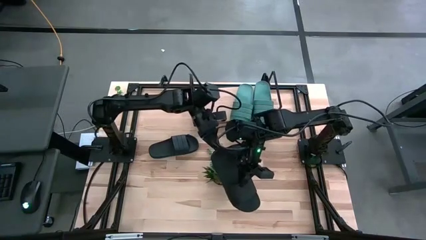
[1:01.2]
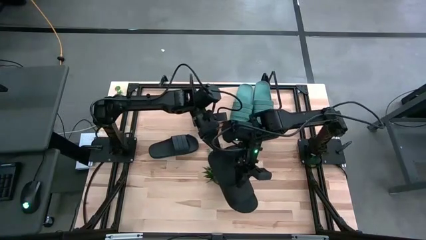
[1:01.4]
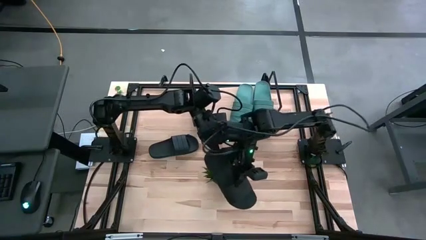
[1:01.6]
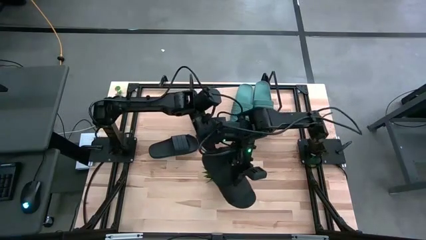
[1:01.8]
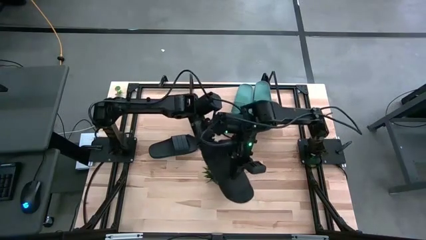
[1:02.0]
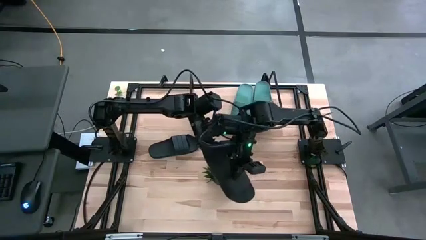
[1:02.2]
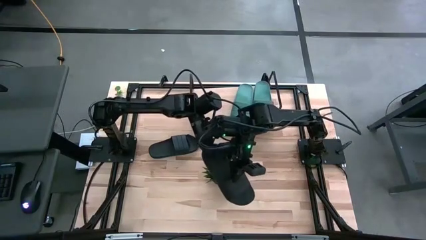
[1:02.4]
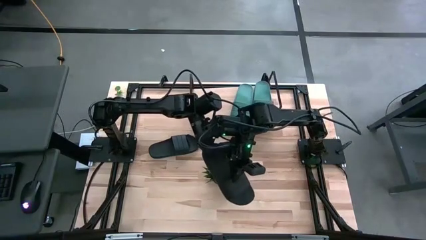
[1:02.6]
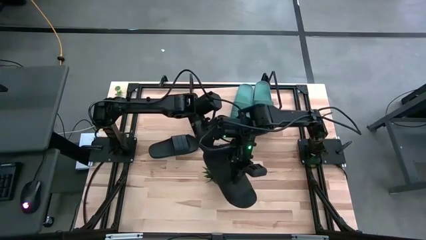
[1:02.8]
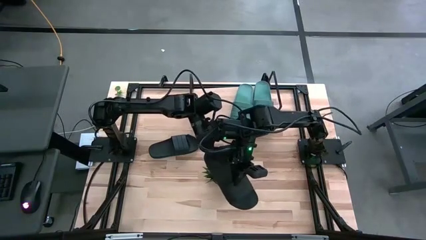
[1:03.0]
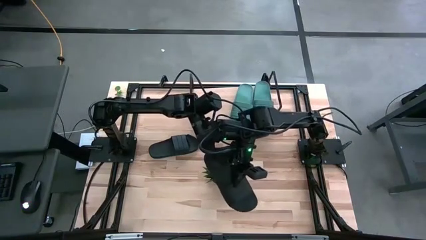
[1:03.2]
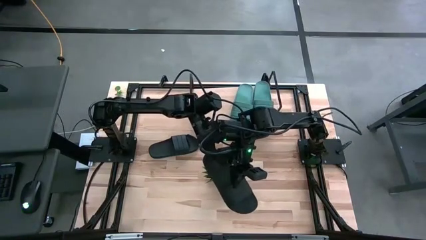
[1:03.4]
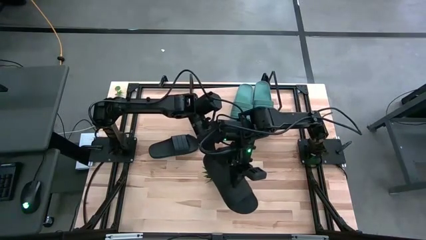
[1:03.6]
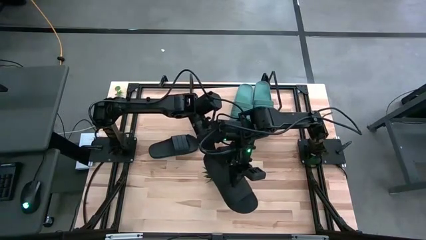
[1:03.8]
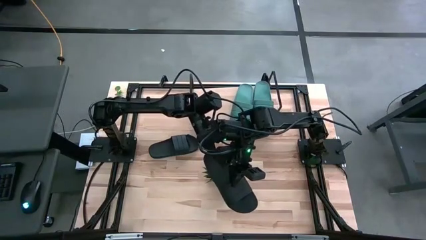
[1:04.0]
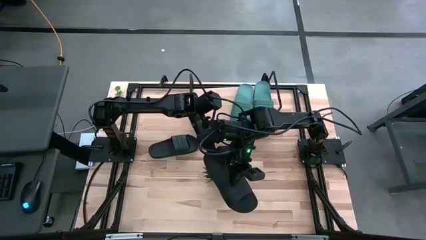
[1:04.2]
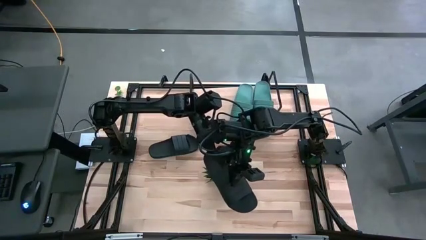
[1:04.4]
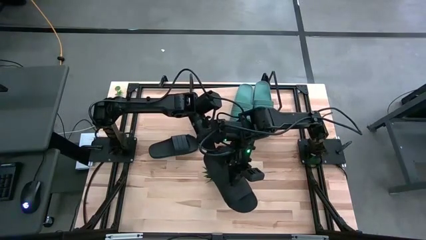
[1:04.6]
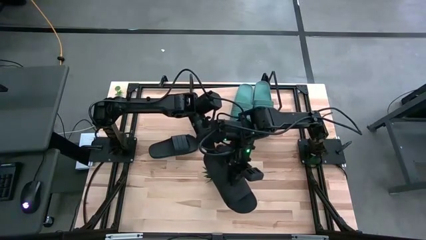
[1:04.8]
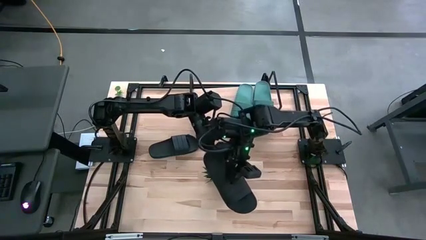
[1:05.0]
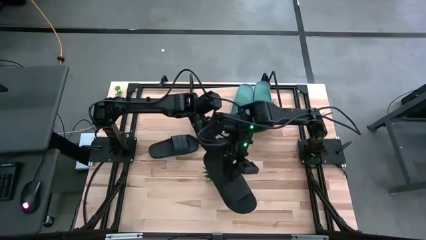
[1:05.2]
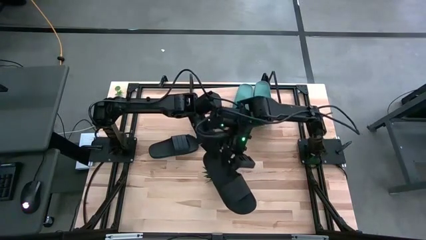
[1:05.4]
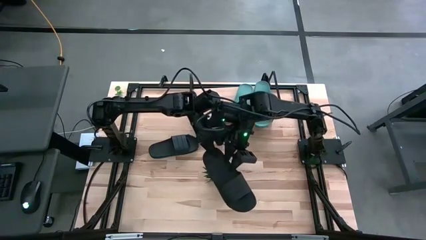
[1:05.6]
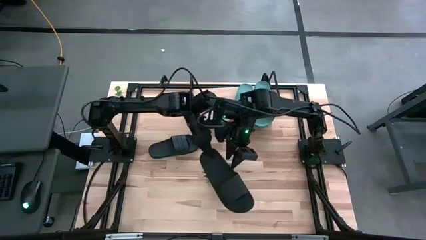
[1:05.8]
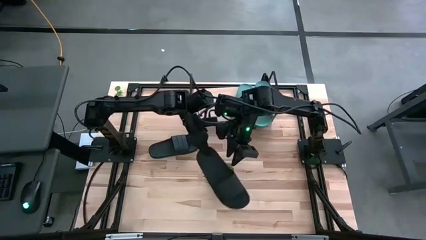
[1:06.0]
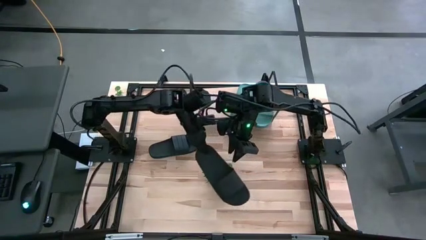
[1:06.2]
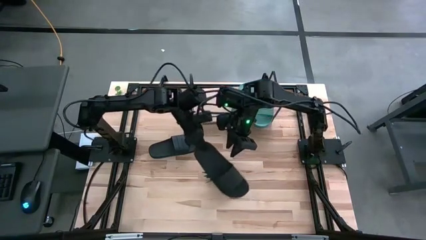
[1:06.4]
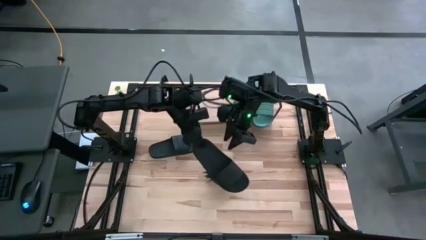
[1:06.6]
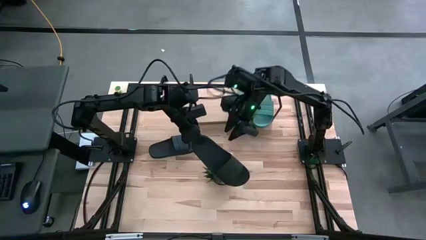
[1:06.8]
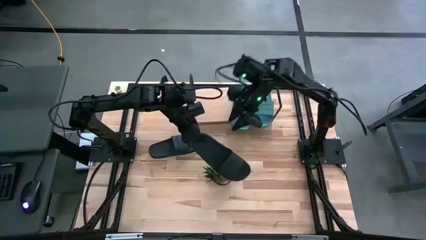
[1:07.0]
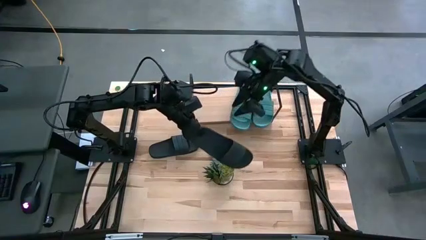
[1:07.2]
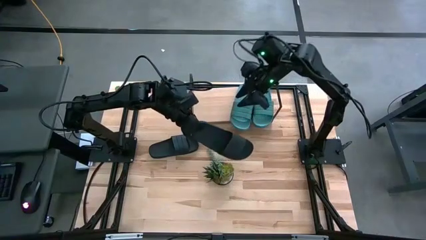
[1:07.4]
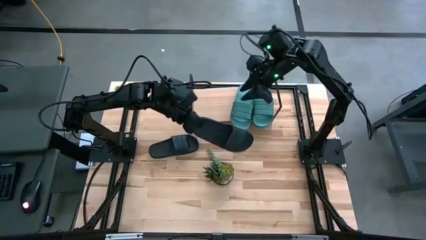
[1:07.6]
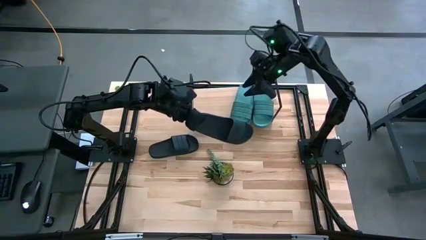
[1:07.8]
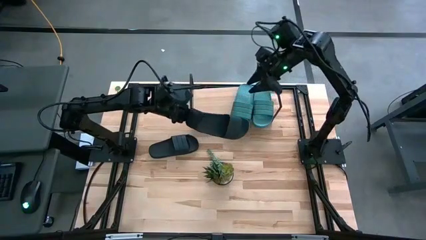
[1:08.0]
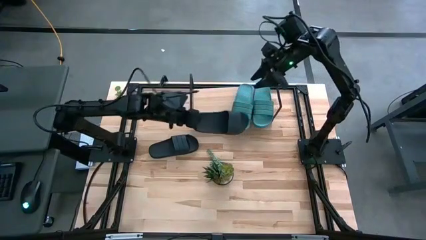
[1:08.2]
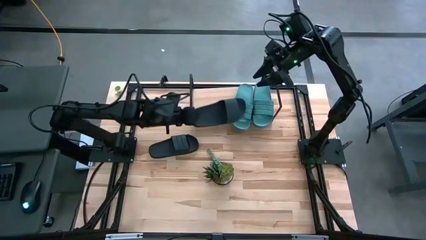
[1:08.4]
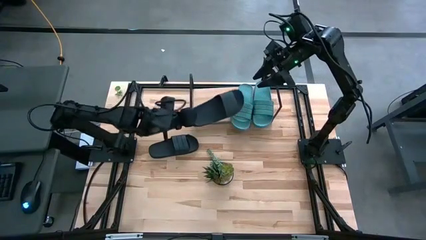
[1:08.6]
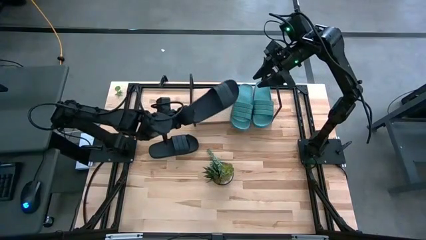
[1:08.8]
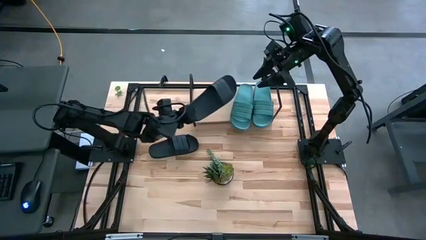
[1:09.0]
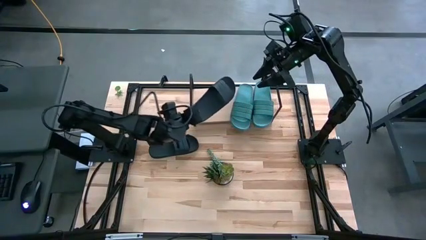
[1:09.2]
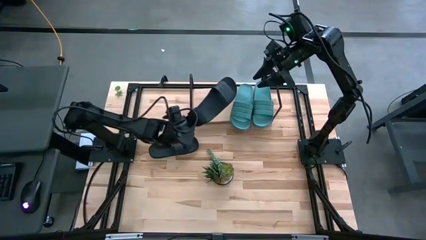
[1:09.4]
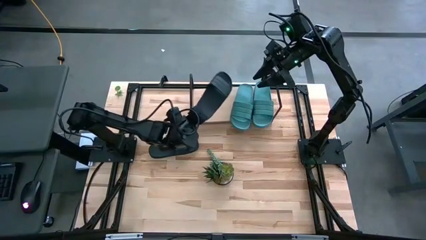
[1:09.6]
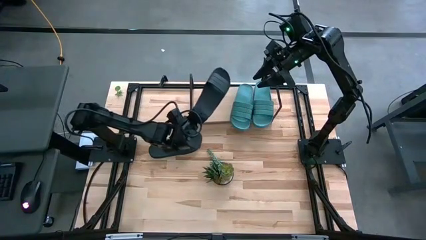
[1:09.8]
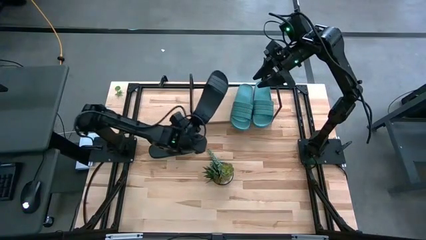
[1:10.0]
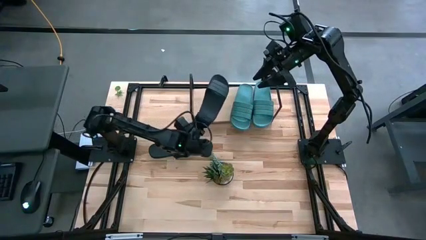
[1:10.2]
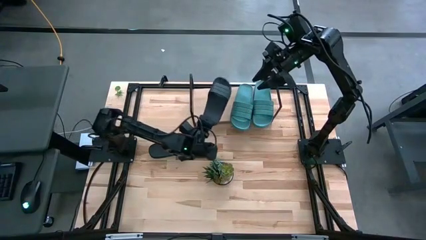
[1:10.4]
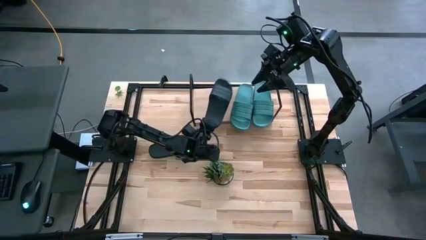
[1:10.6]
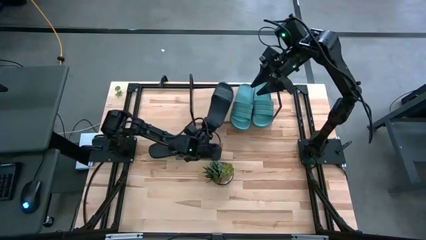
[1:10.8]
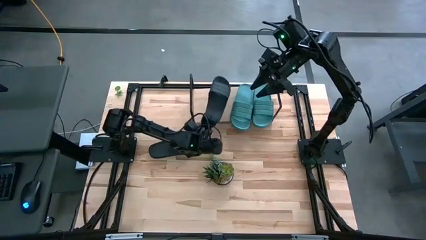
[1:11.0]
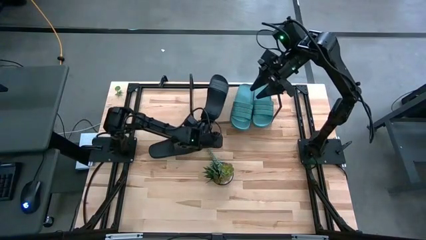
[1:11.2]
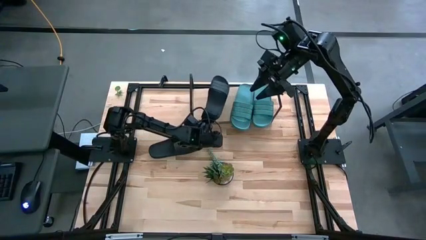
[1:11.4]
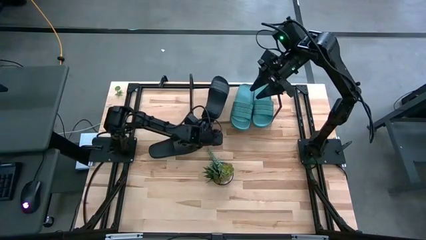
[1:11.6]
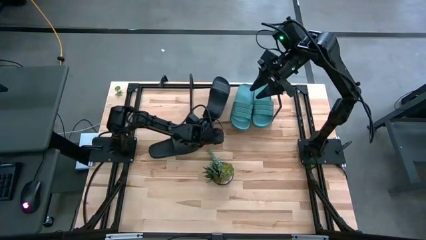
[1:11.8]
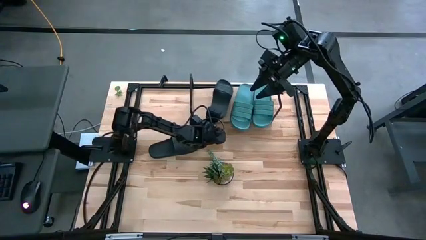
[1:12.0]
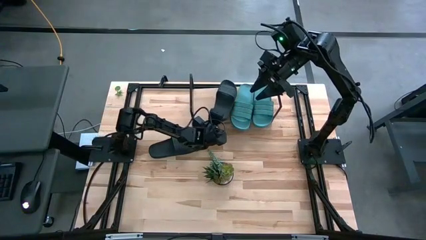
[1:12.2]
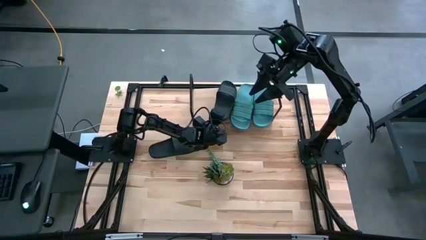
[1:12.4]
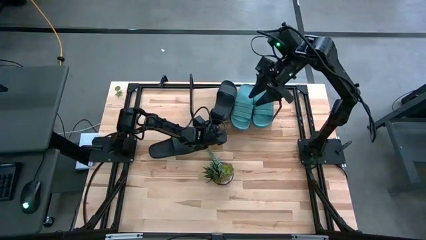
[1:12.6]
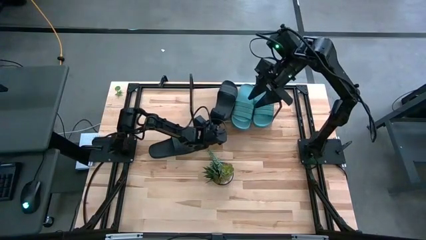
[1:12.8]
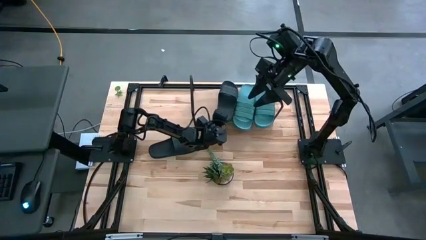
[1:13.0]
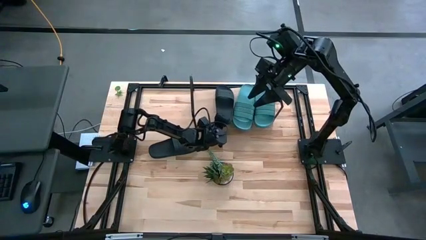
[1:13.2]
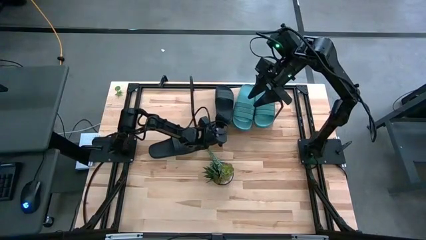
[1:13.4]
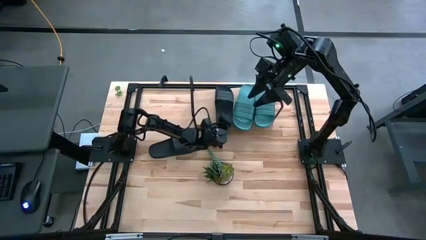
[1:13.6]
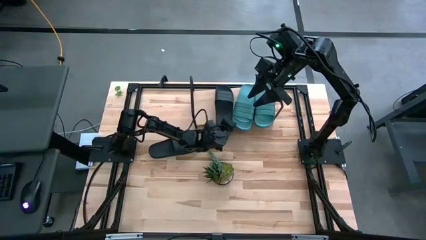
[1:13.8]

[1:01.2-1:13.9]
Task: Pick and place slides into the shelf
Put the right black slipper on the shelf

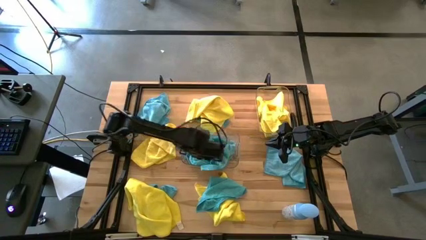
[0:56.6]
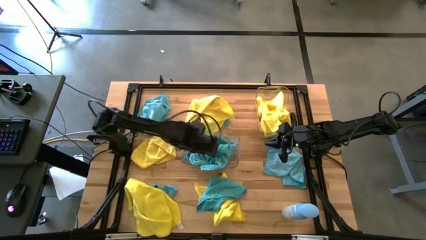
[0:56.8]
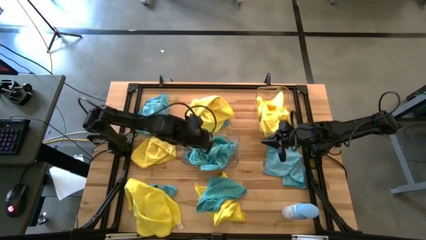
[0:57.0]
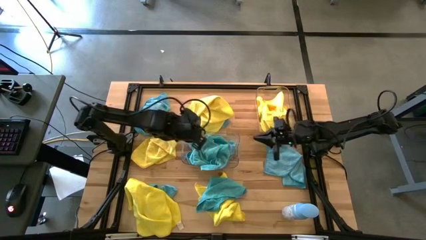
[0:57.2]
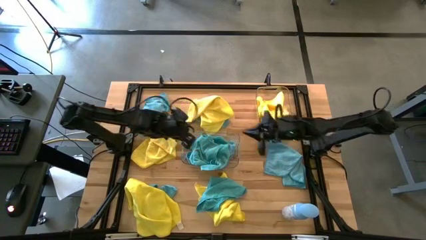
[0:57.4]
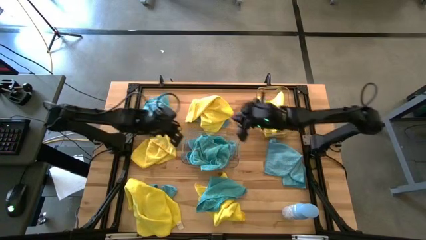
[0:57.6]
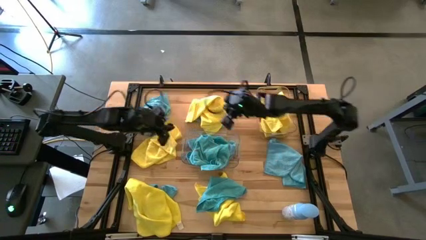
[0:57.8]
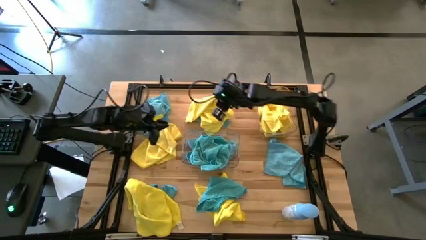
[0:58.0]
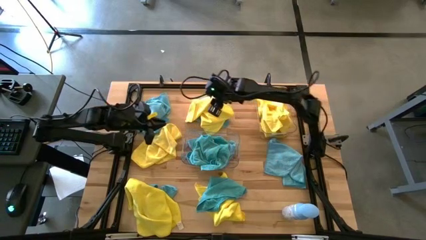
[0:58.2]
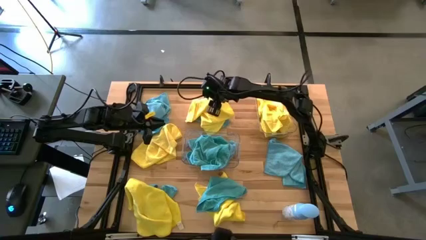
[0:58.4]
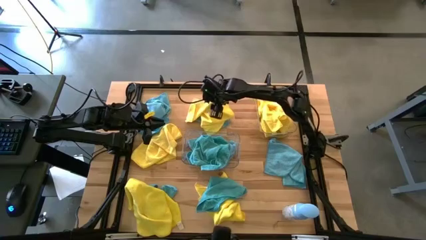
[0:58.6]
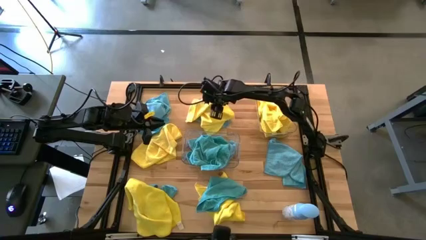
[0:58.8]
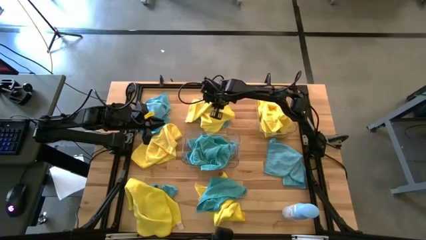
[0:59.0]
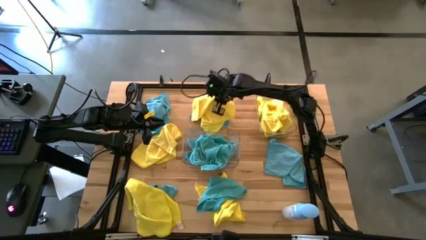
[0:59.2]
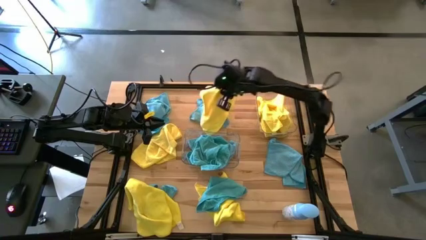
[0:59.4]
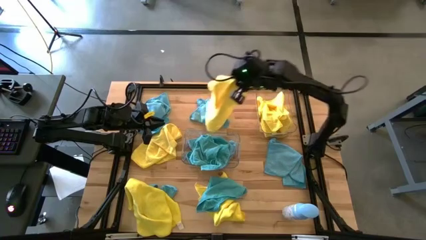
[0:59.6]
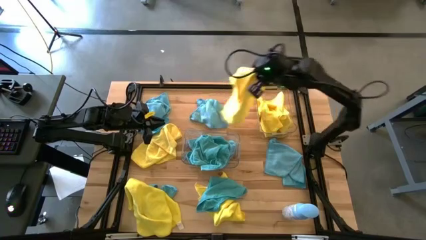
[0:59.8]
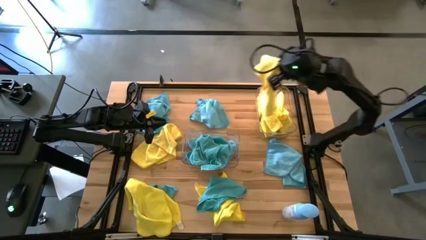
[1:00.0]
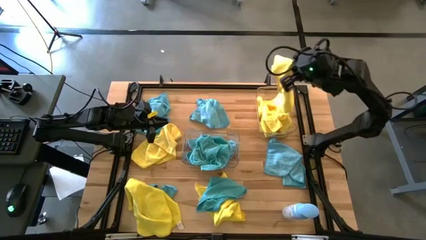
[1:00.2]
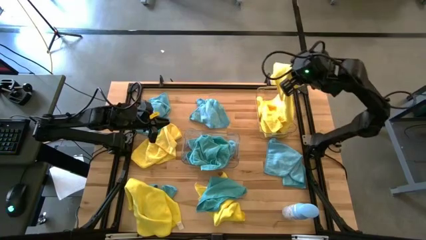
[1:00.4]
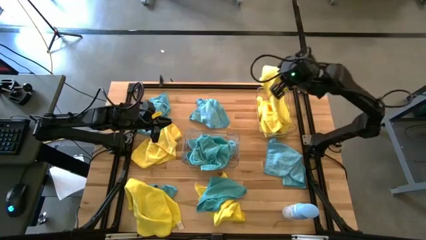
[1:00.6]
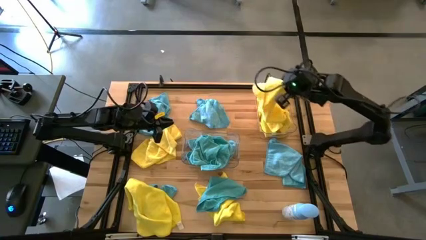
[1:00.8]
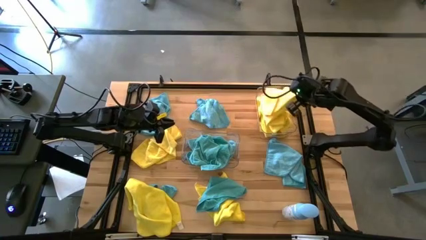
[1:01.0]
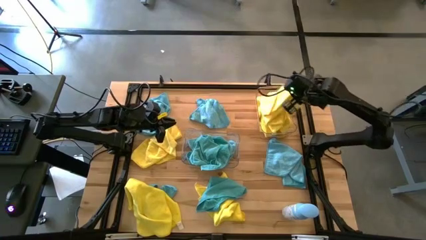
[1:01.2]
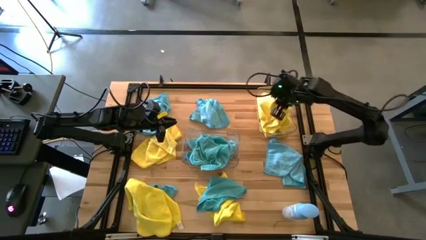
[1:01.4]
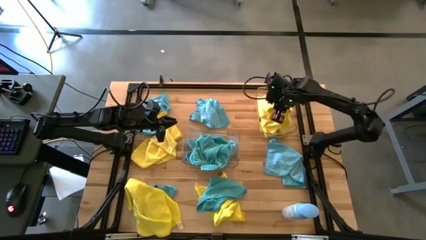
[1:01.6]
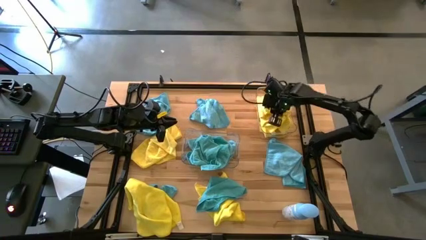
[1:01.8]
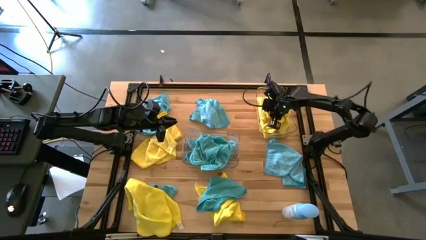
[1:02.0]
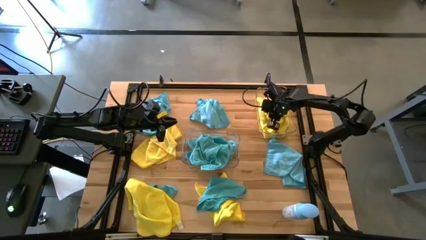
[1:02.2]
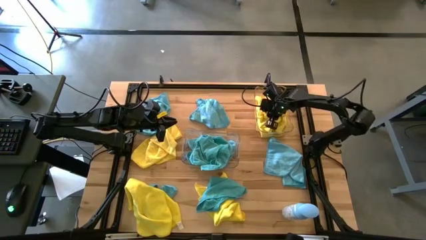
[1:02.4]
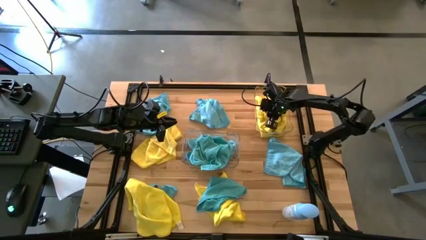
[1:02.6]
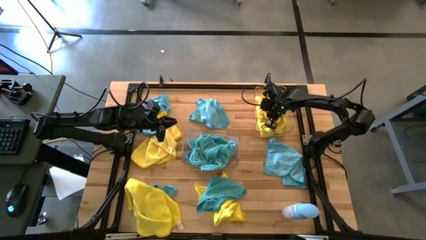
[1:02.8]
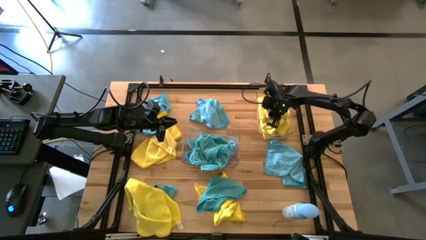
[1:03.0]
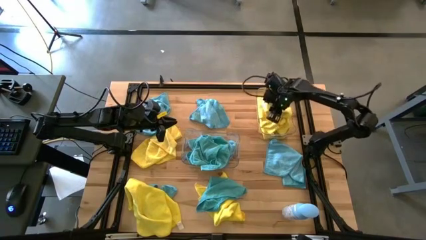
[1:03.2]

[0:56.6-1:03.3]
Task: Sort microfiber towel by color & place in baskets
Put the yellow towel into the top transparent bin
